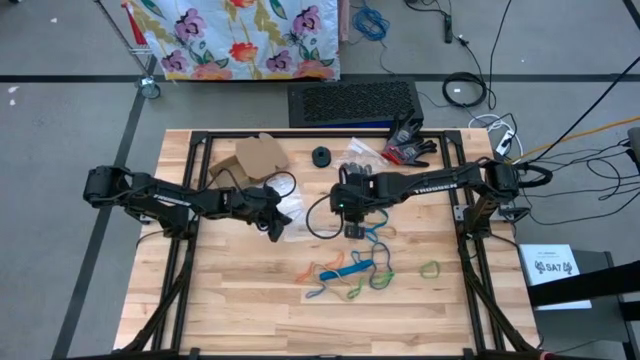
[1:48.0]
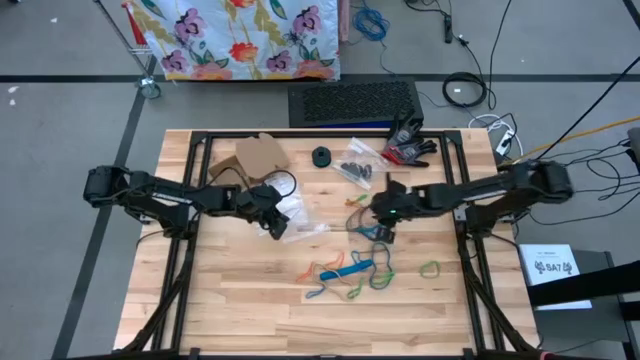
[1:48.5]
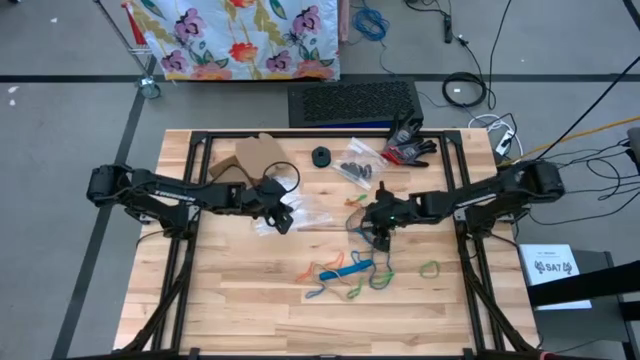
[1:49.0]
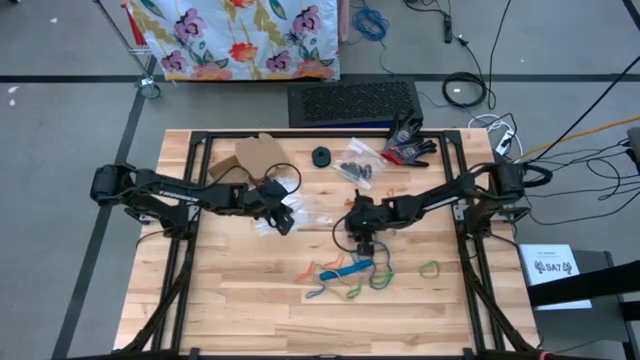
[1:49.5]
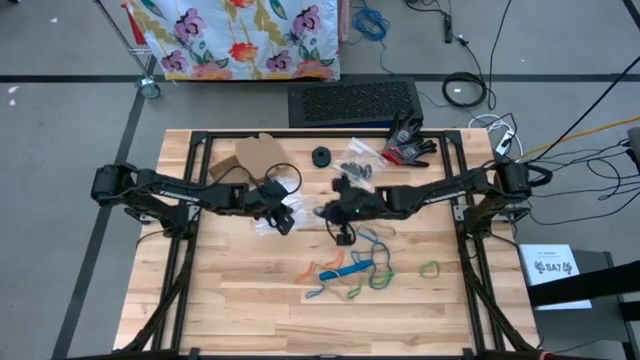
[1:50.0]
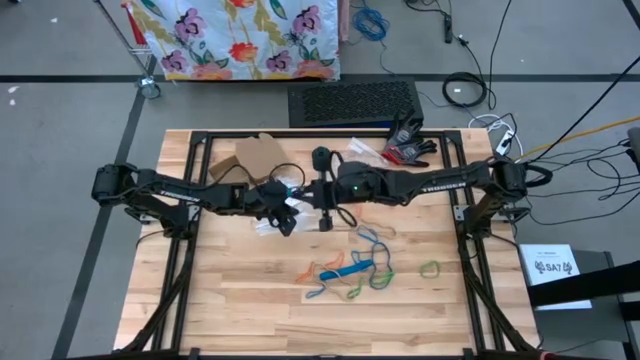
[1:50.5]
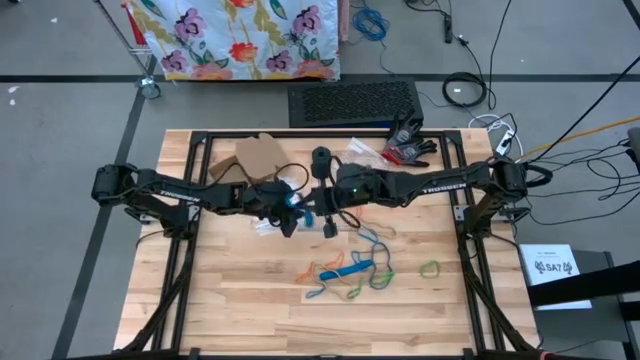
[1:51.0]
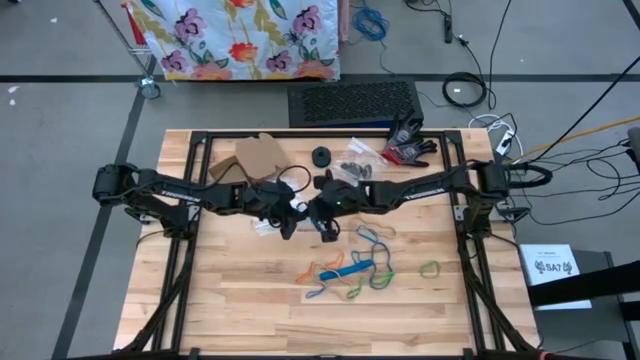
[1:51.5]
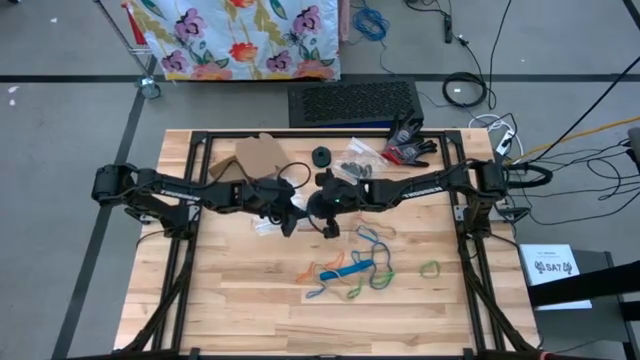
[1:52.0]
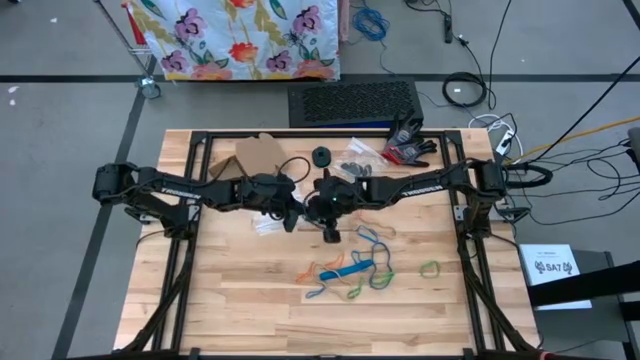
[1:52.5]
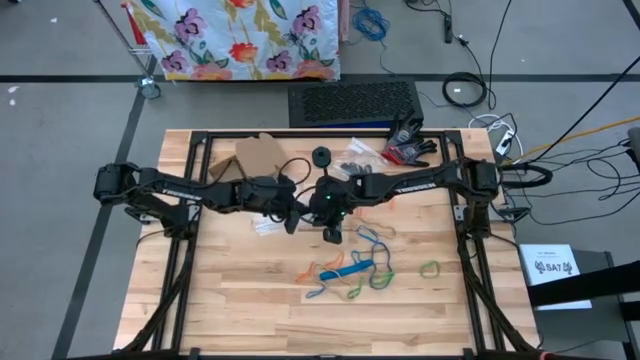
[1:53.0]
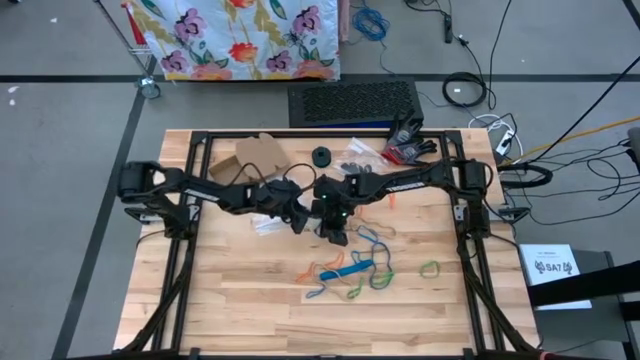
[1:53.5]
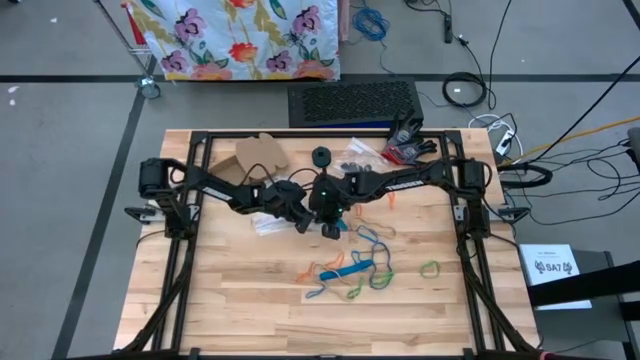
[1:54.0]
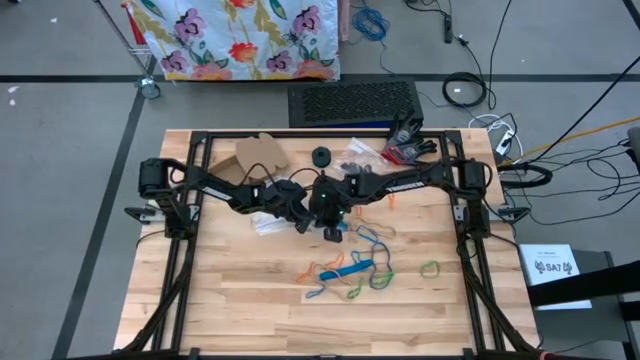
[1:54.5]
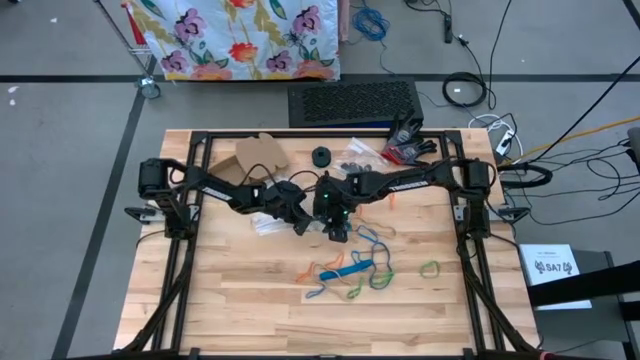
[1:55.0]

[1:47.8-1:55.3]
Task: Sort rubber bands
Put the blue rubber band into the transparent zip bag

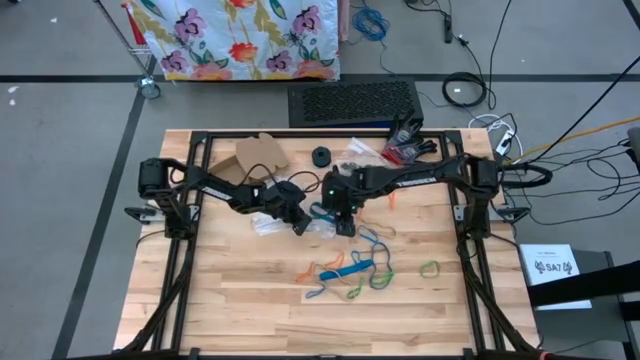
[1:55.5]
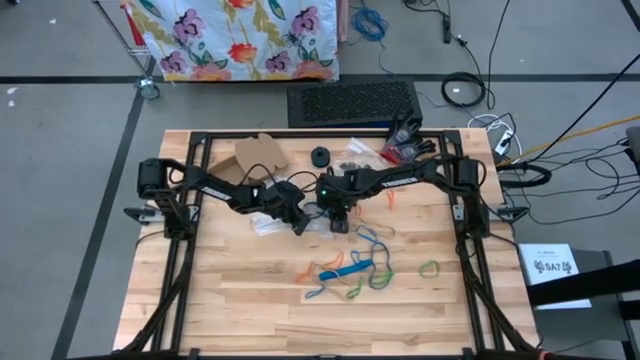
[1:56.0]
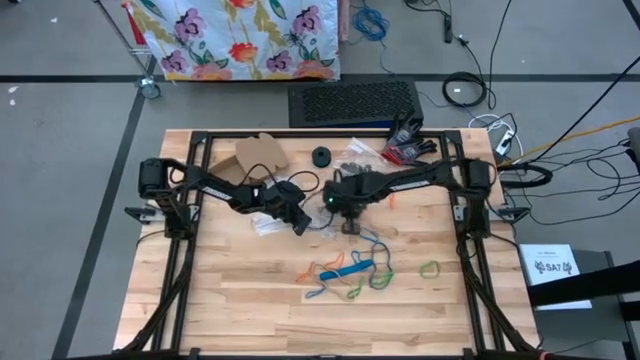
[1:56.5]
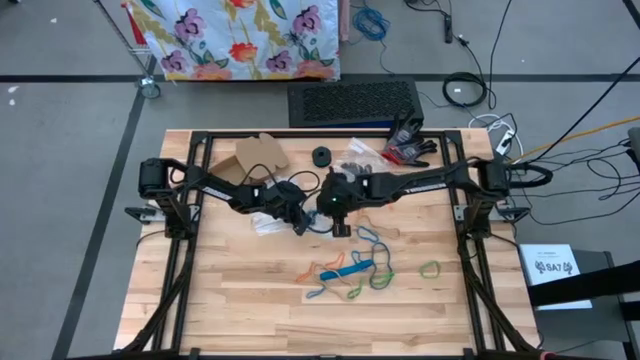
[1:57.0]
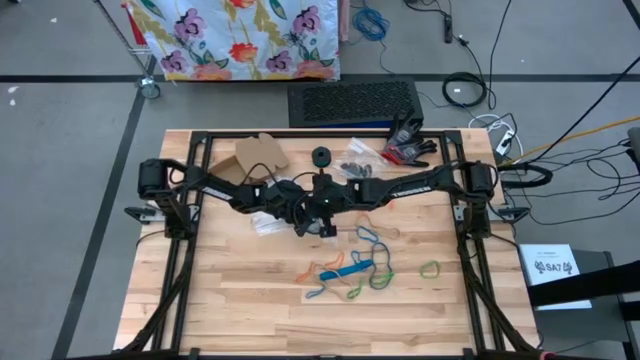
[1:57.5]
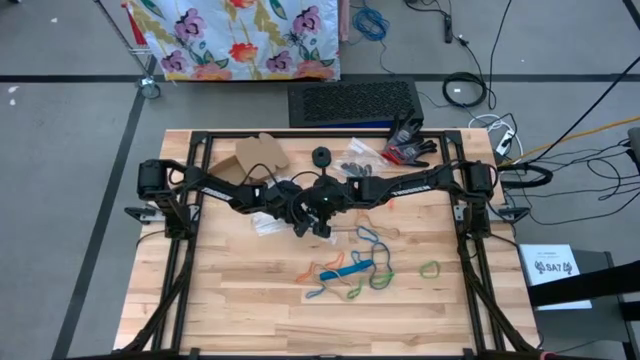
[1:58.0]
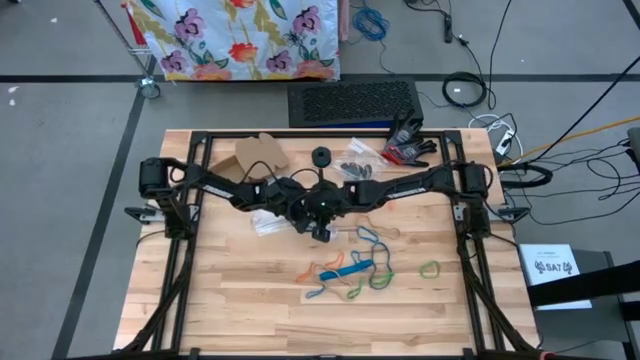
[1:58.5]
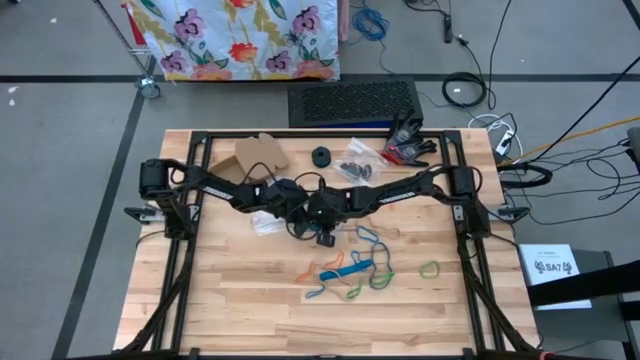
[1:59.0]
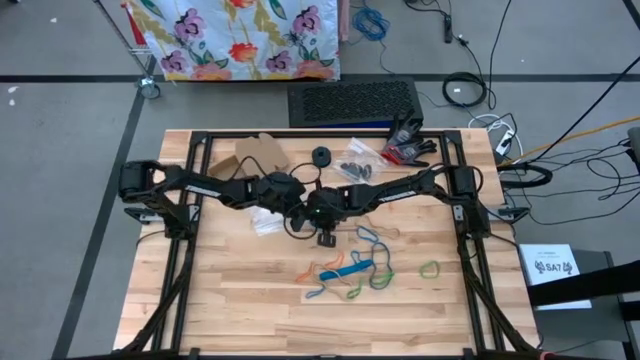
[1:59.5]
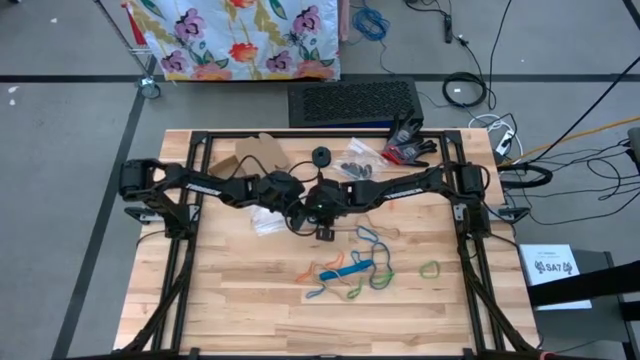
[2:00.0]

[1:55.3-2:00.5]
Put the blue rubber band into the transparent zip bag

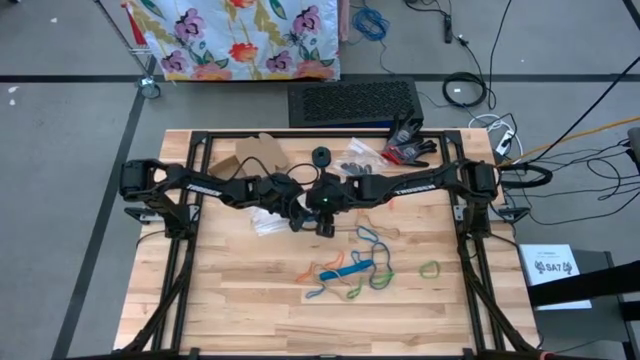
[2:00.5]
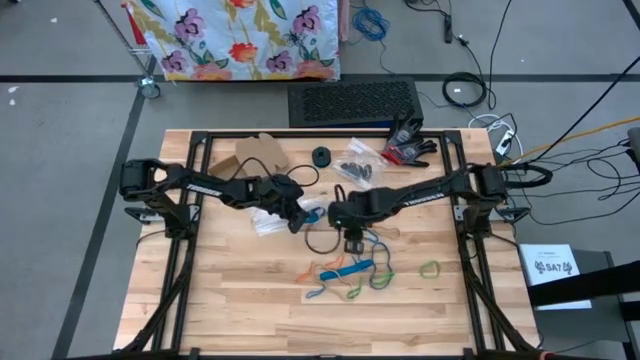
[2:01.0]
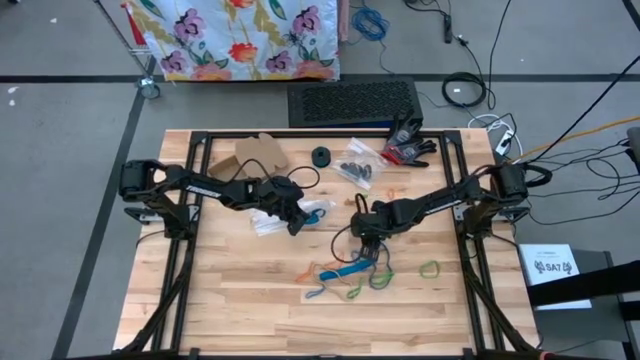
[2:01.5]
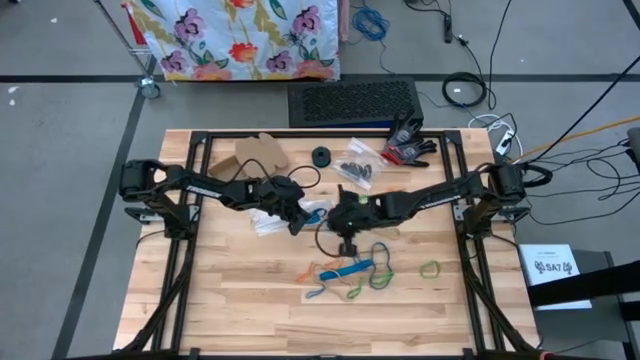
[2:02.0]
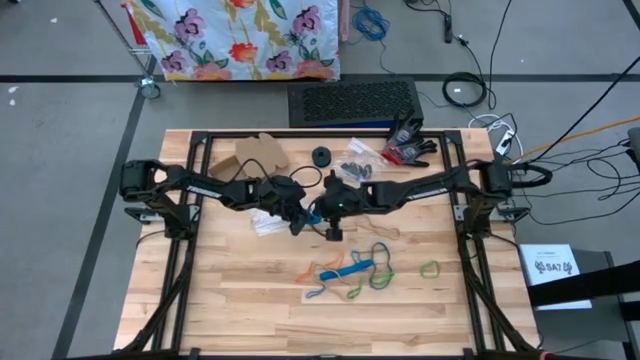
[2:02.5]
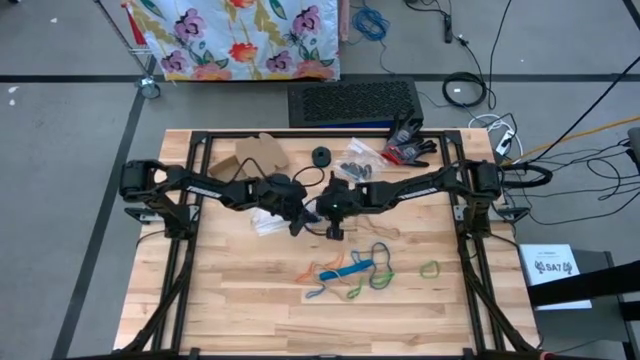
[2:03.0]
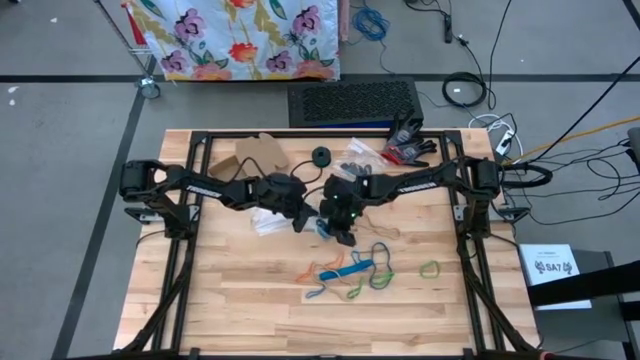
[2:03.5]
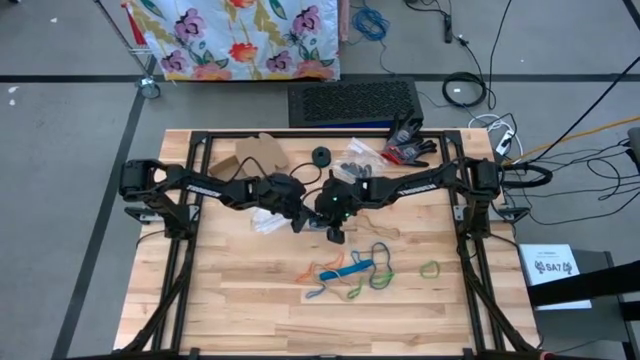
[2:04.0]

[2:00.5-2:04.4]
Put the blue rubber band into the transparent zip bag

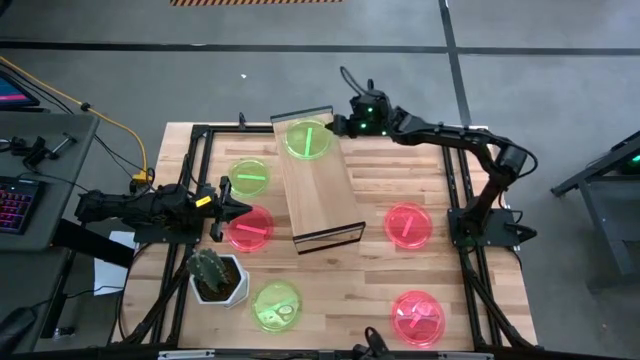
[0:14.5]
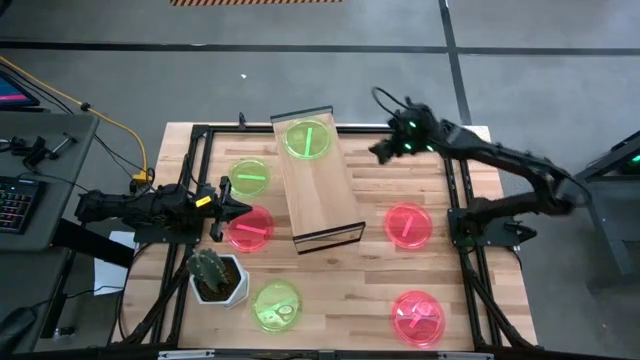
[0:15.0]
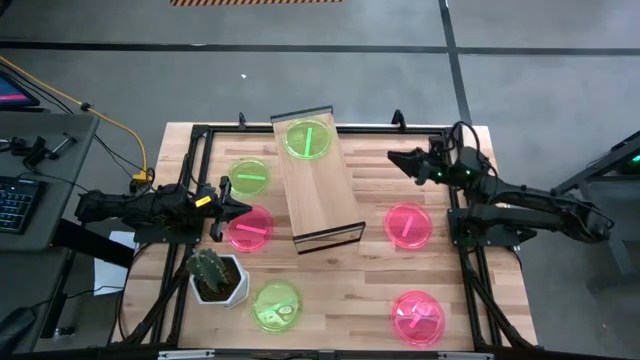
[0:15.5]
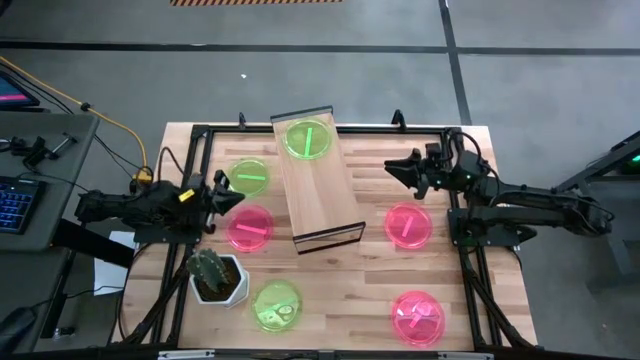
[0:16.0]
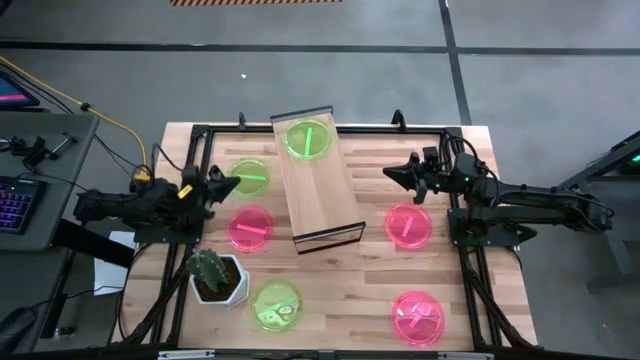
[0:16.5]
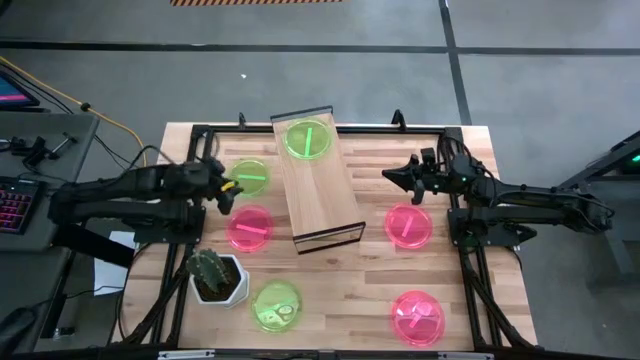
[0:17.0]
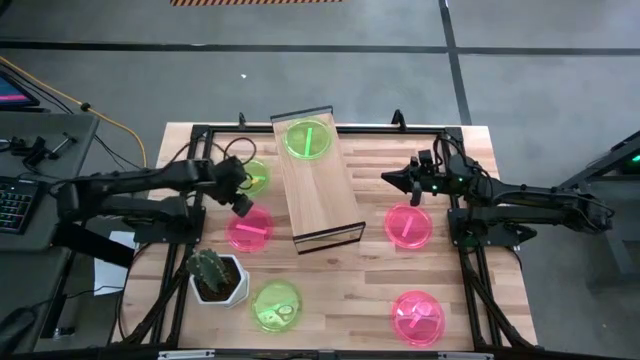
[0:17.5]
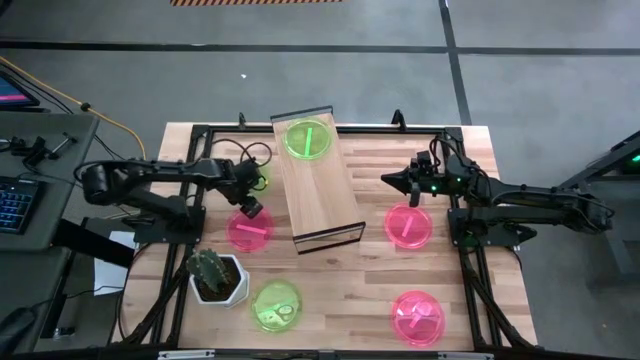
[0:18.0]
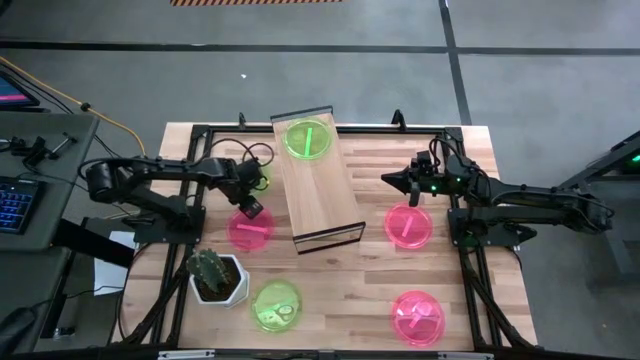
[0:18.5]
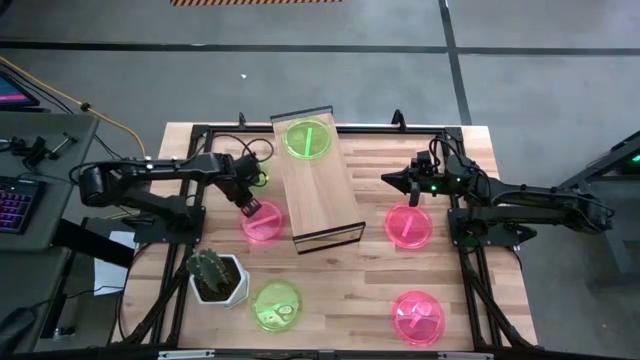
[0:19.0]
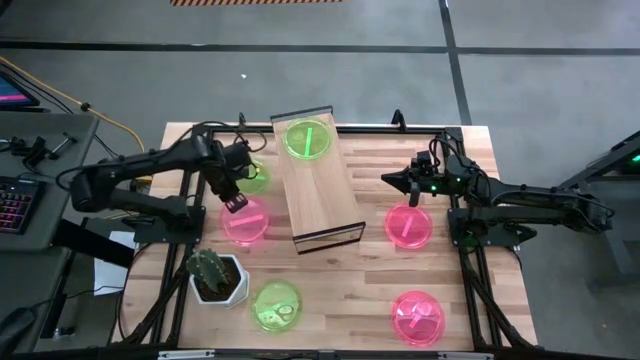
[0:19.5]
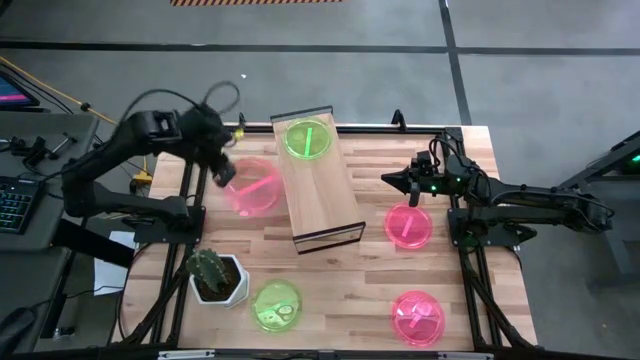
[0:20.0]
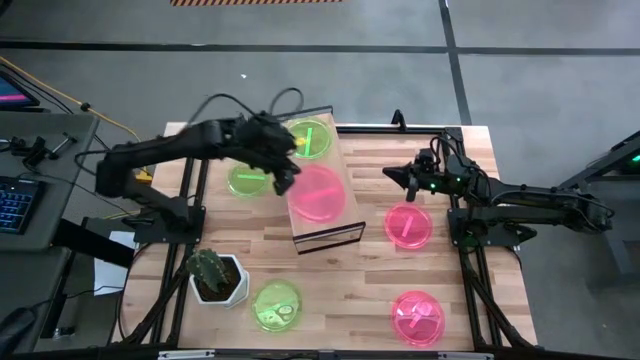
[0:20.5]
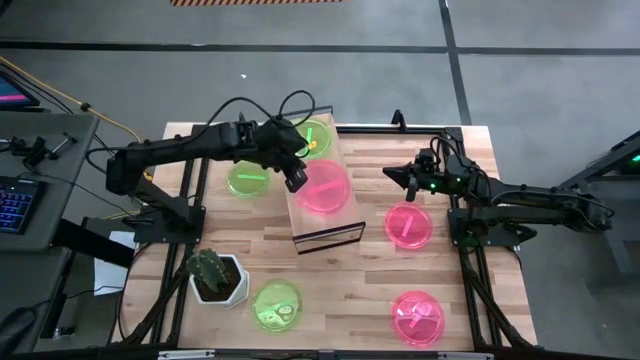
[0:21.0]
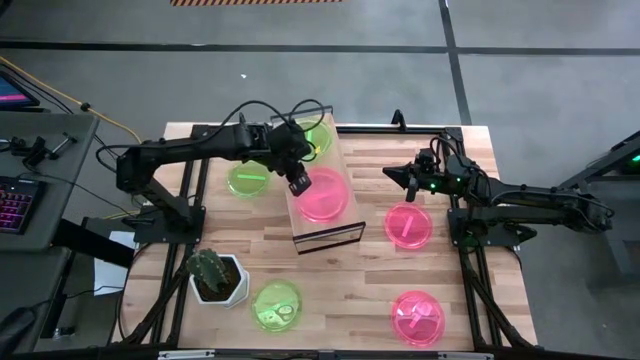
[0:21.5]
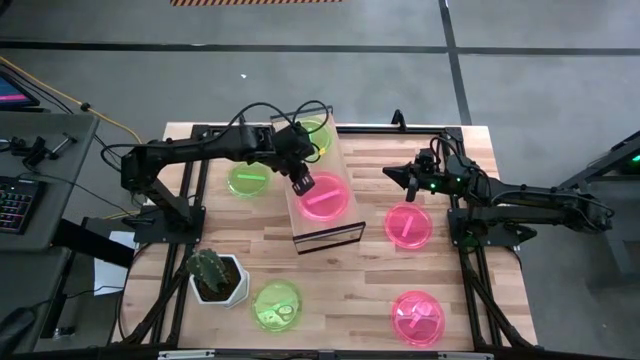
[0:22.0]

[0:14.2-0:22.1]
Task: Place and stack plates onto a shelf
Put the top left light red plate on the shelf
